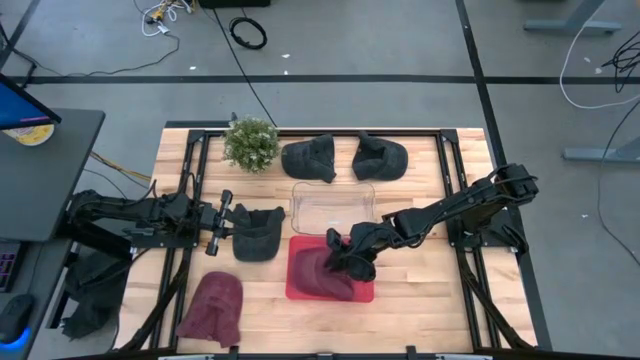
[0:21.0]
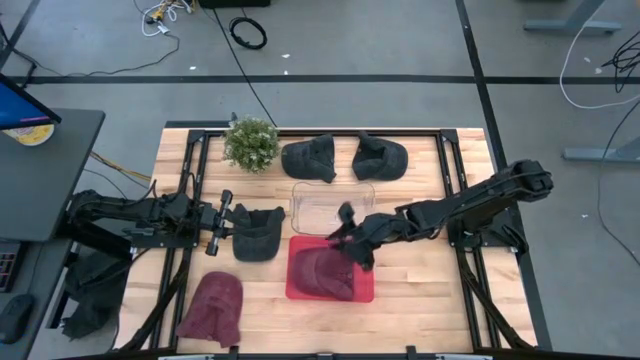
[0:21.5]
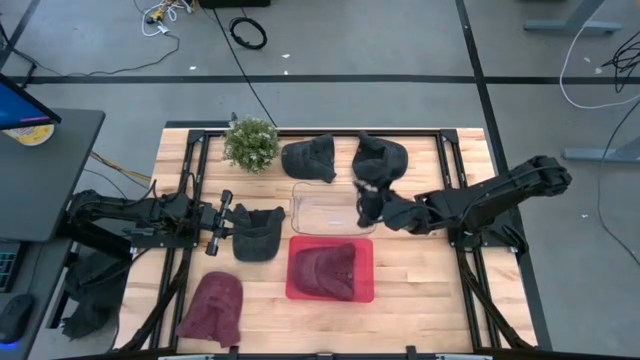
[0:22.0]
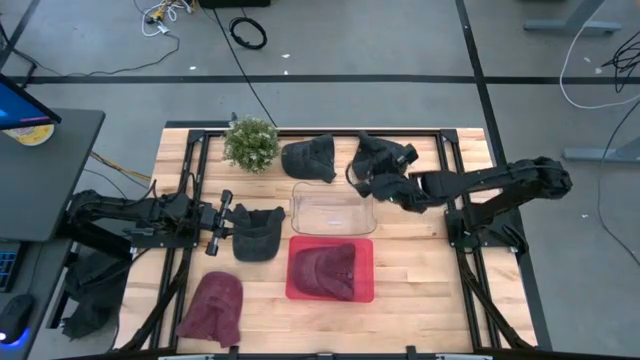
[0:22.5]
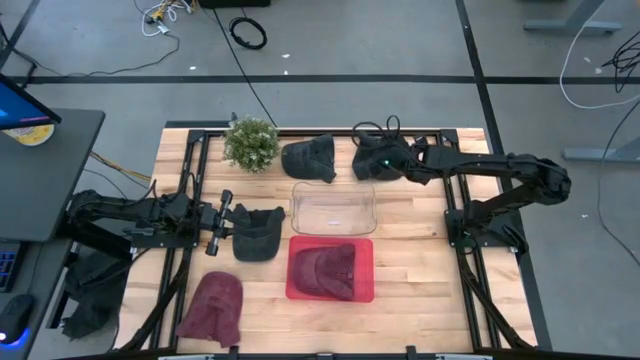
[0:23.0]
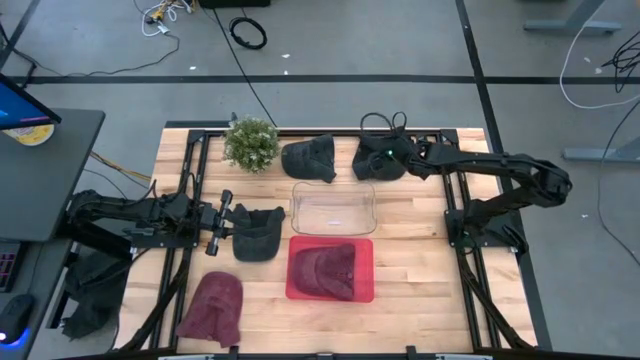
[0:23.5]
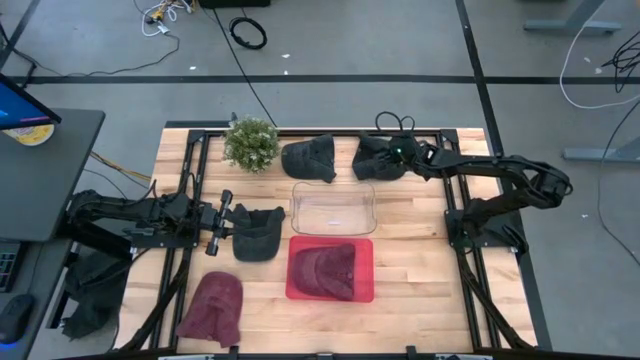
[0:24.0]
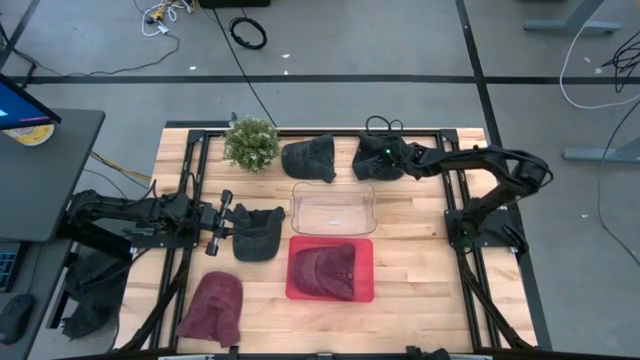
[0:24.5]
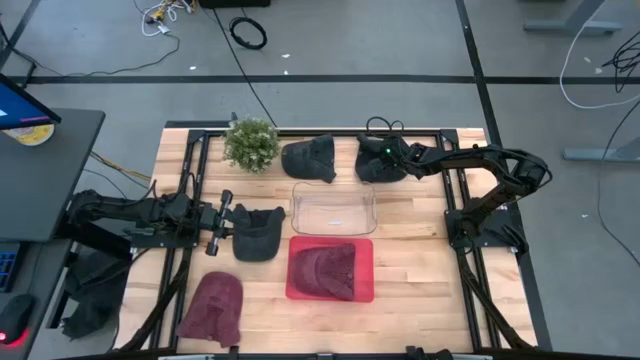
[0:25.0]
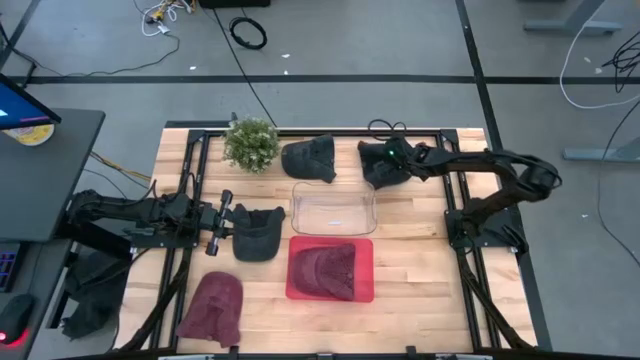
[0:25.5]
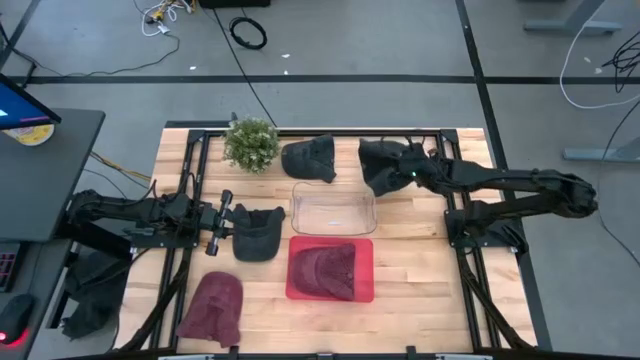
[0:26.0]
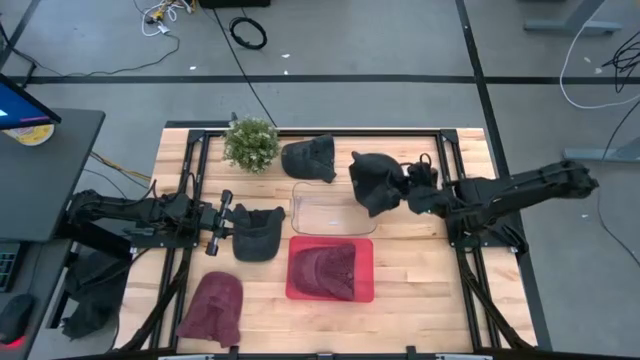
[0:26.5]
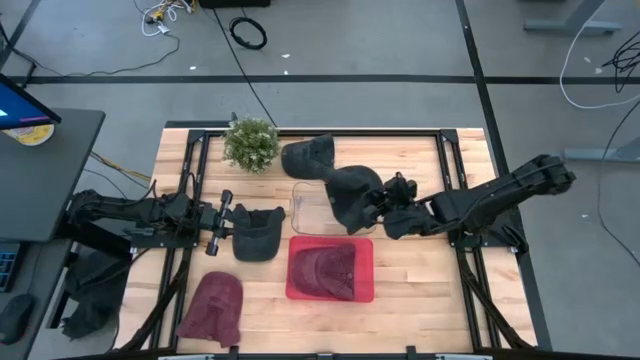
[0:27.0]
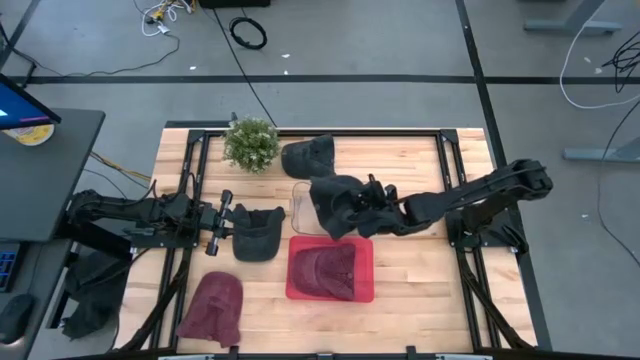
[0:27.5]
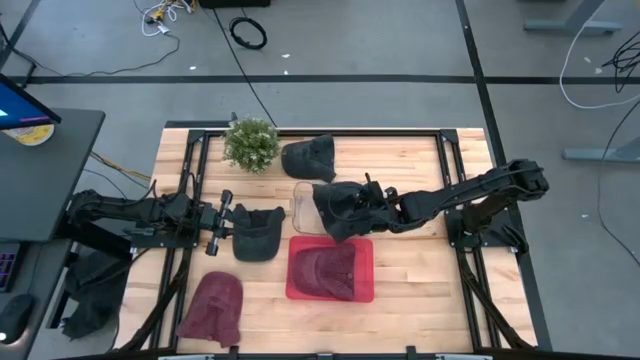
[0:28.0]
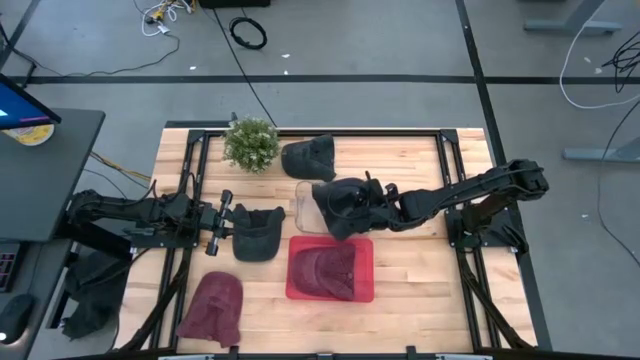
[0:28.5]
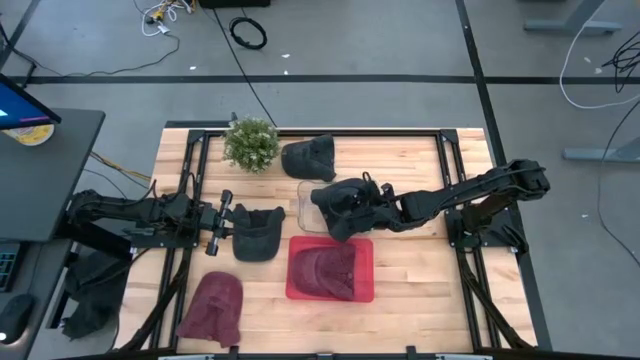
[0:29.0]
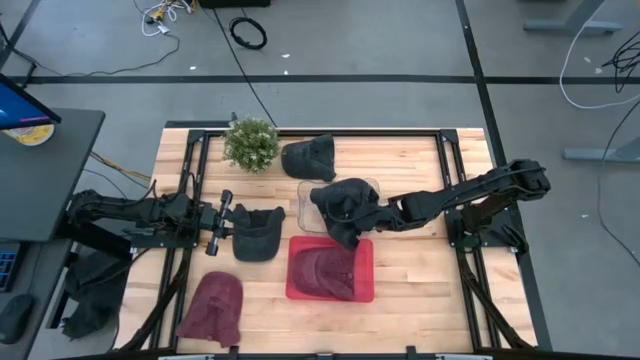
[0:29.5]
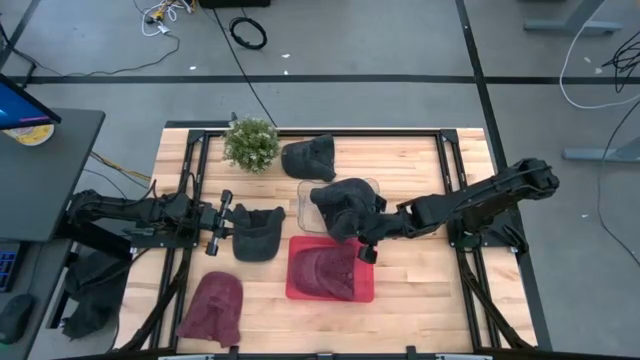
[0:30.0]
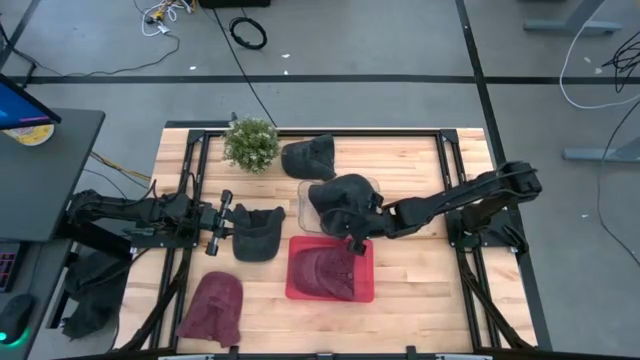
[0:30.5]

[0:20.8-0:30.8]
Task: Pick & Place hat
Put the top right black cap into the transparent bin

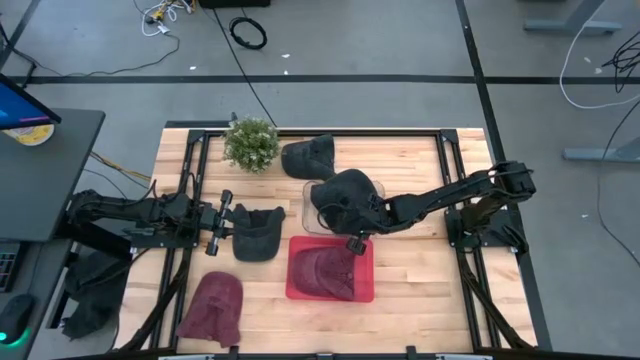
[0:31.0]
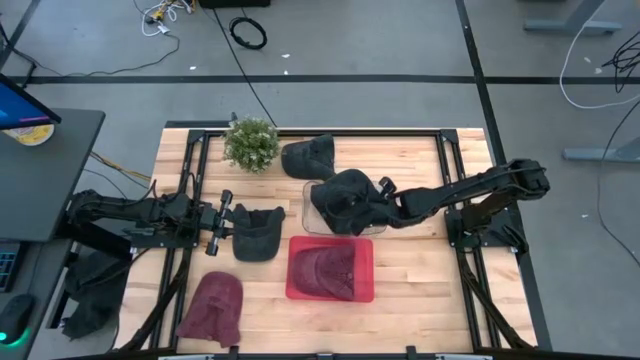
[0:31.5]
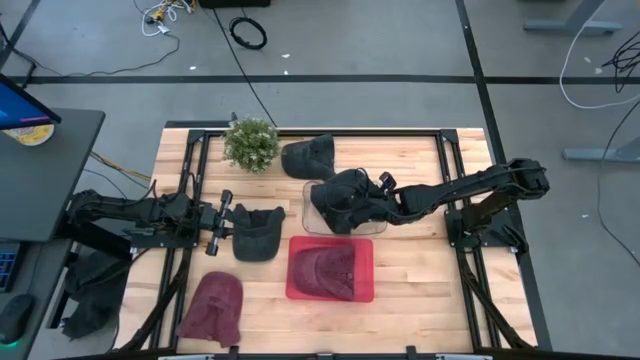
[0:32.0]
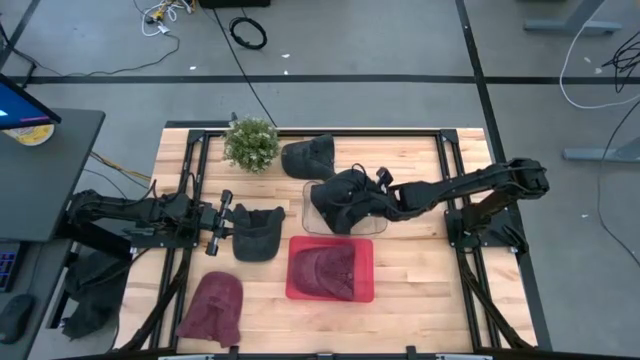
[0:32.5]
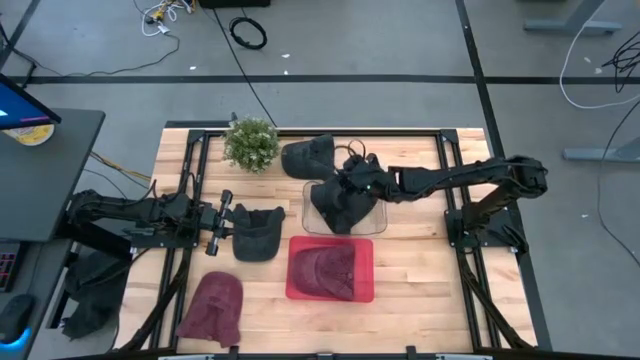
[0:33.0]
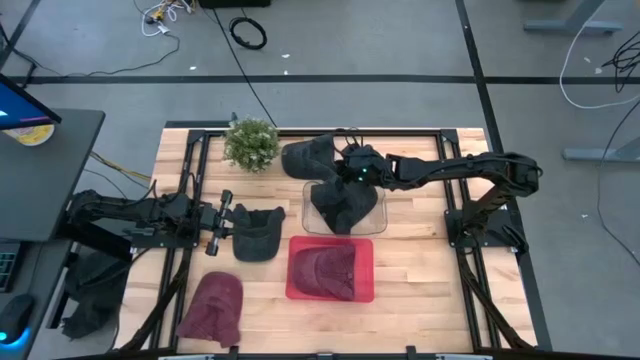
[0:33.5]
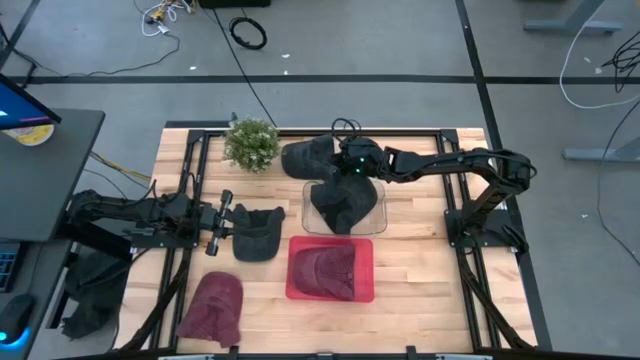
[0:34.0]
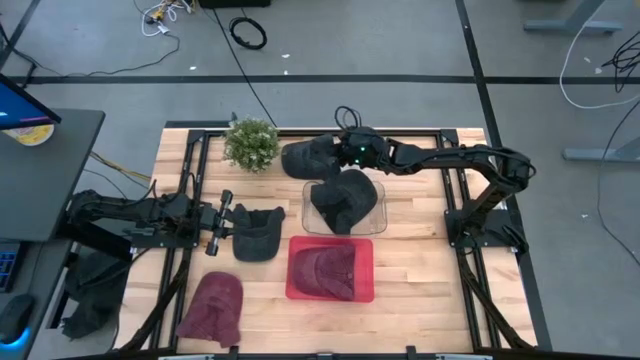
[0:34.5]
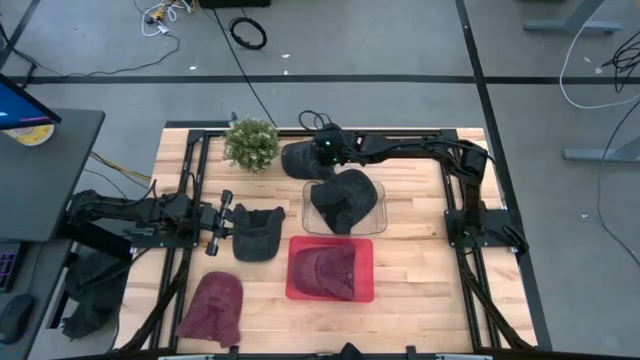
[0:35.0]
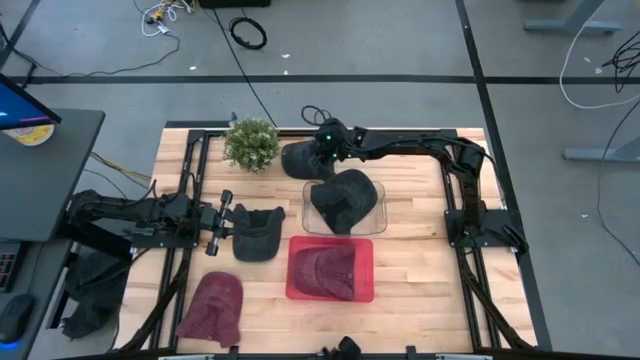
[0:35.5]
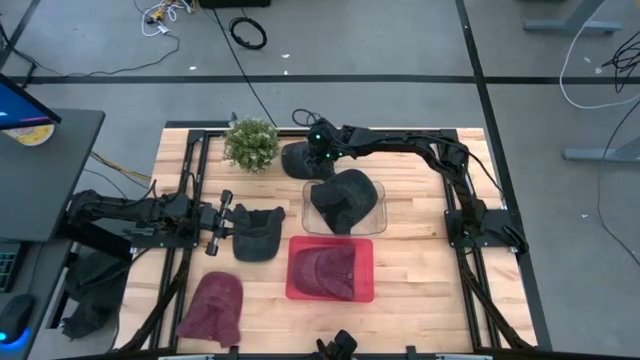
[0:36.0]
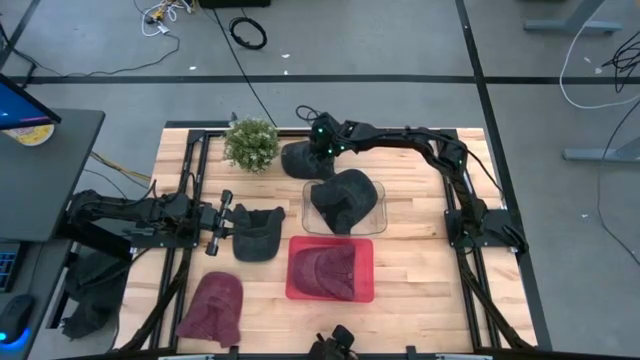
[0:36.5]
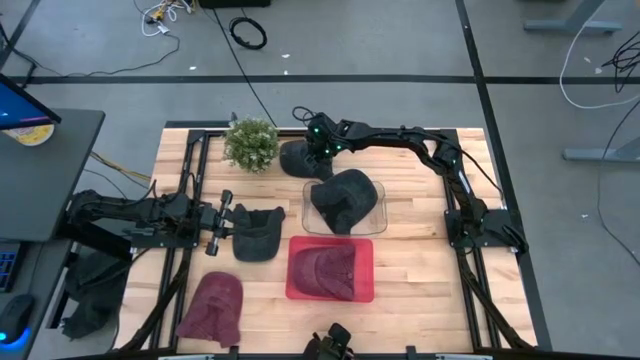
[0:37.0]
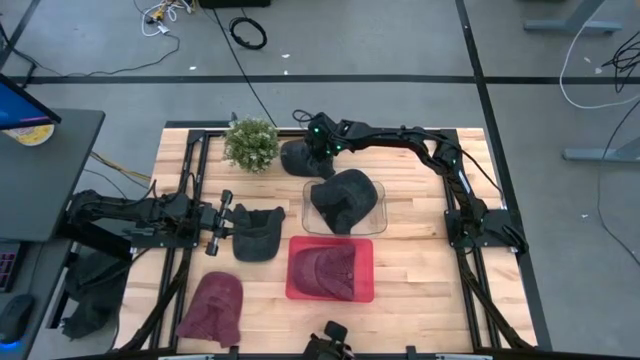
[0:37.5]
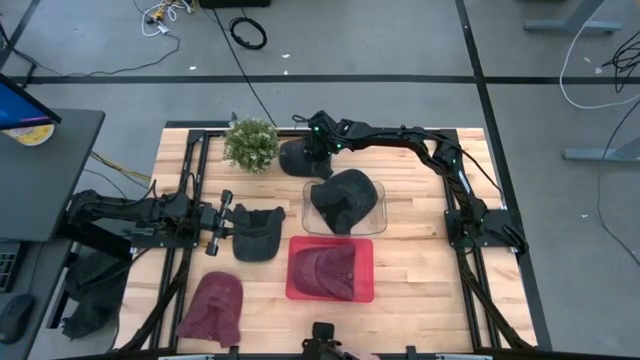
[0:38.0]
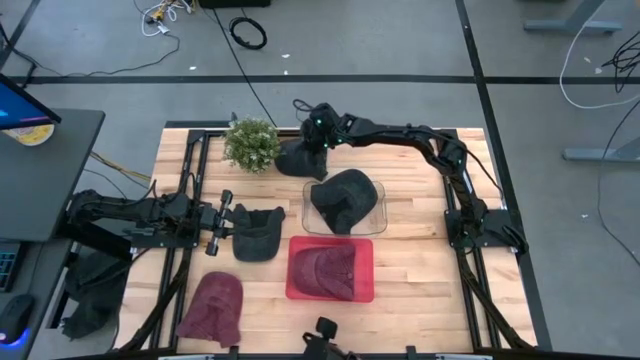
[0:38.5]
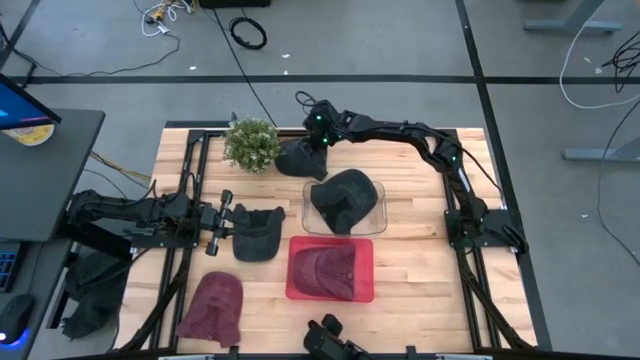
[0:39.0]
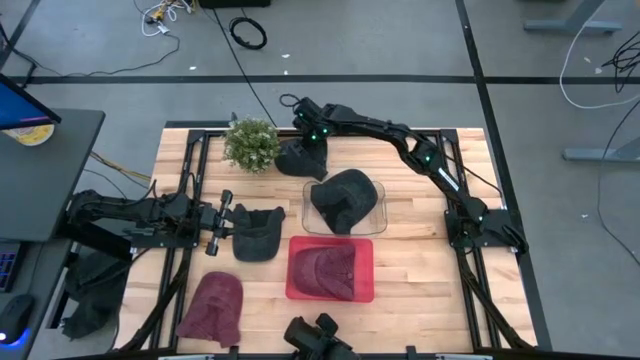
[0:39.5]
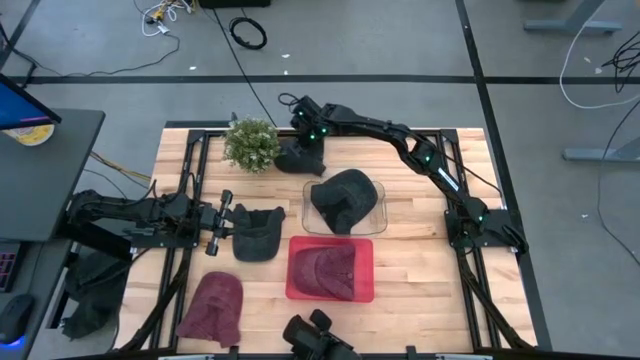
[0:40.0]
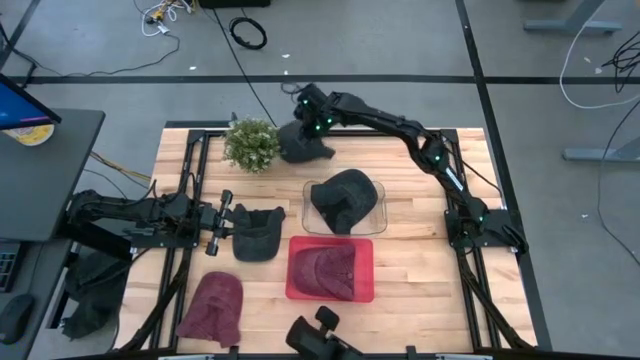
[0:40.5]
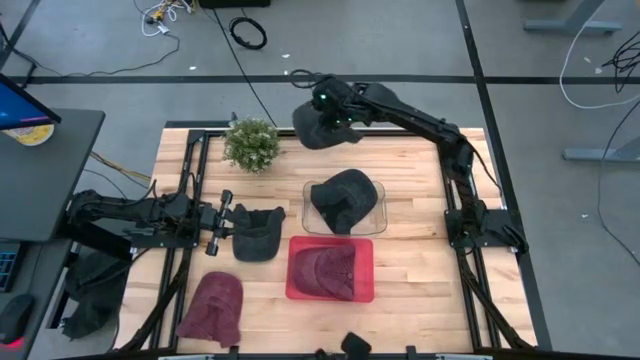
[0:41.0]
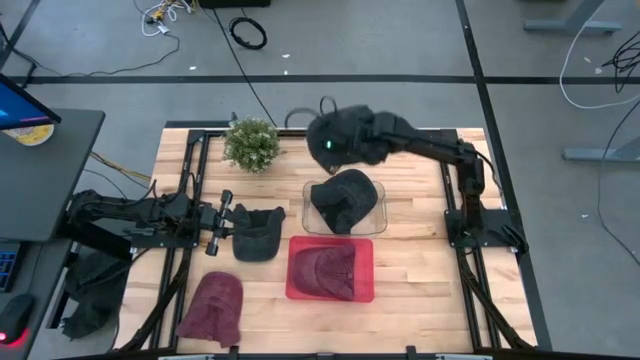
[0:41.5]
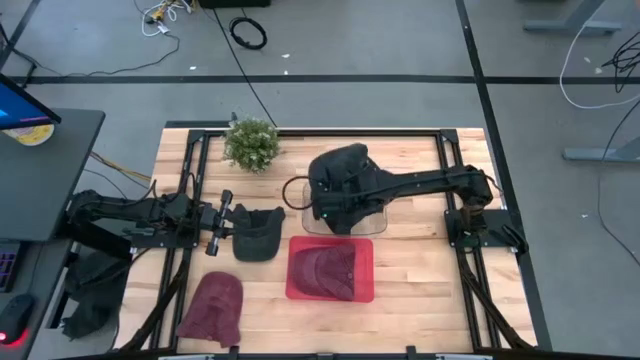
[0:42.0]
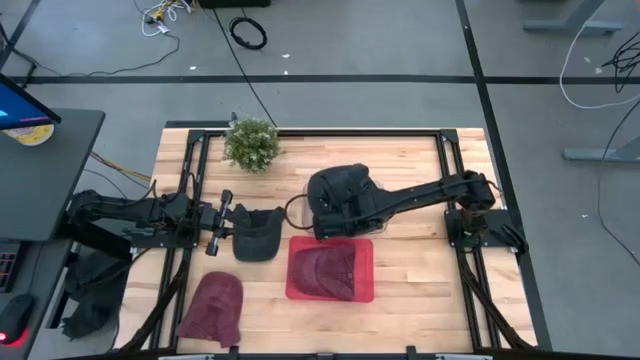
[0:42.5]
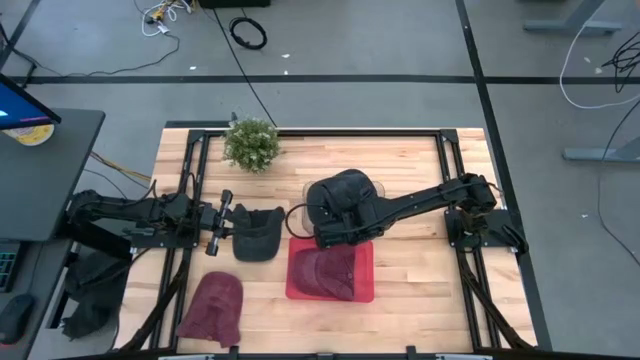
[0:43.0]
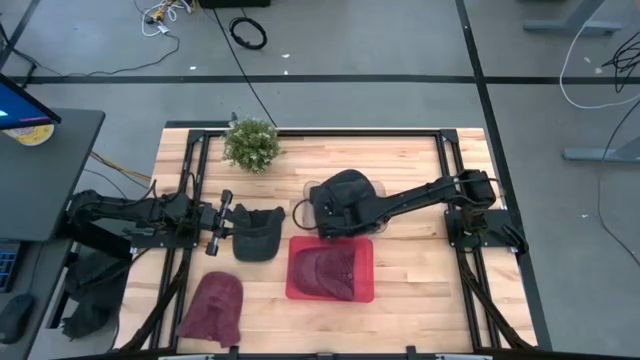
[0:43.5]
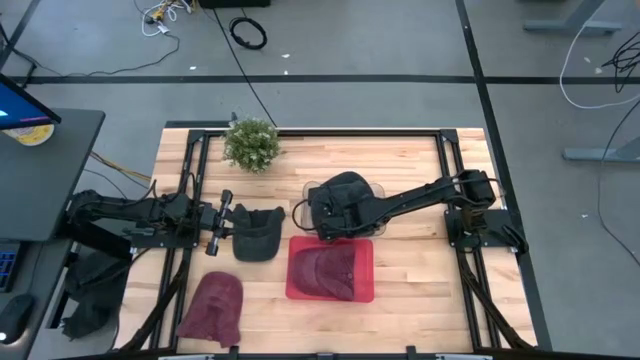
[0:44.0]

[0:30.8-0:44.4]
Put the top black cap into the transparent bin
